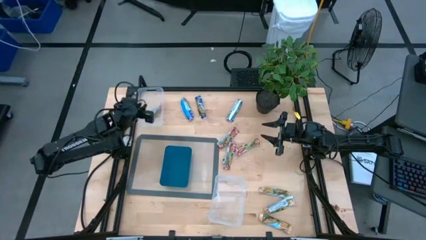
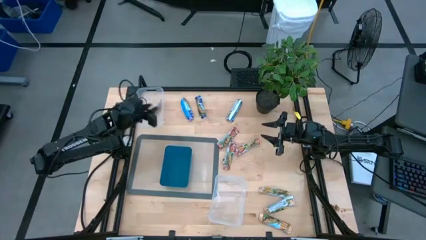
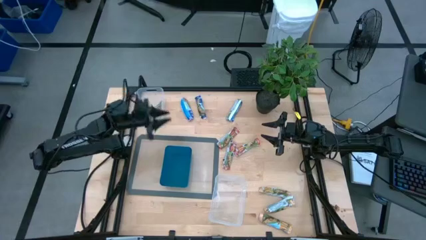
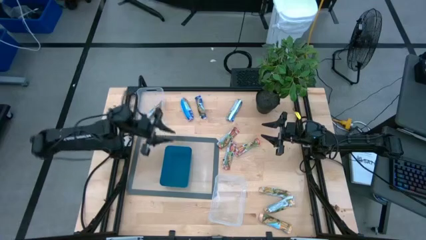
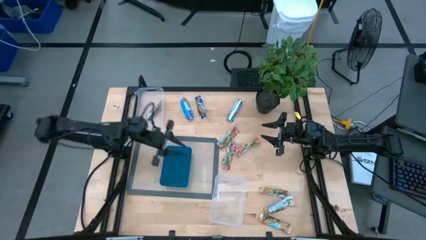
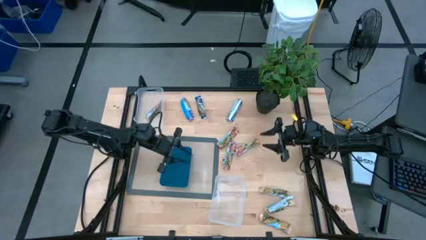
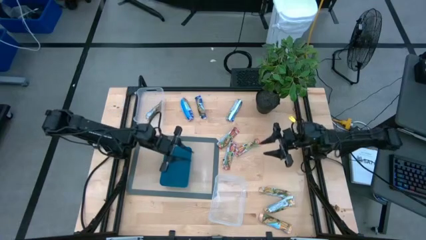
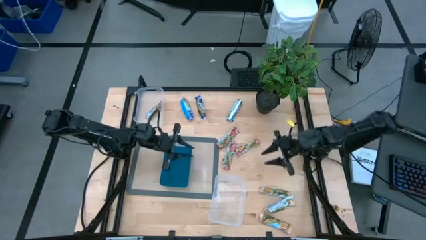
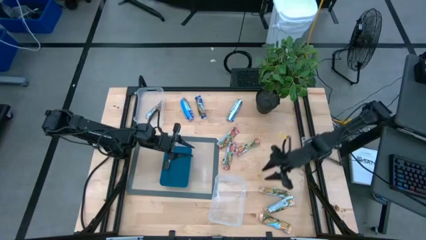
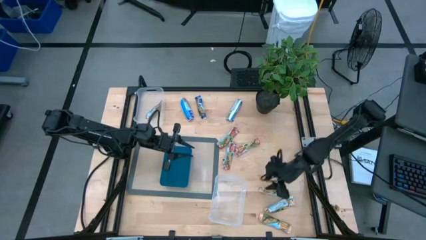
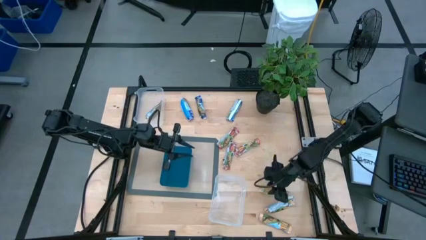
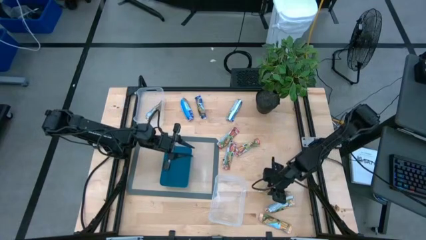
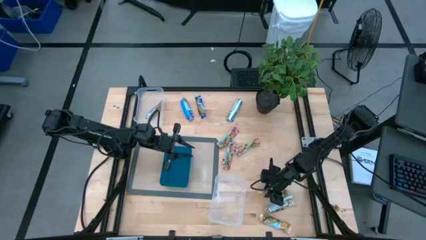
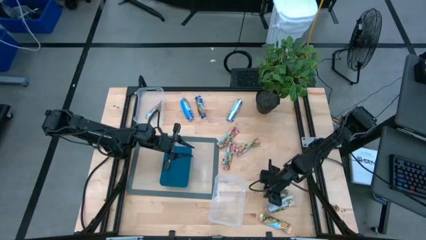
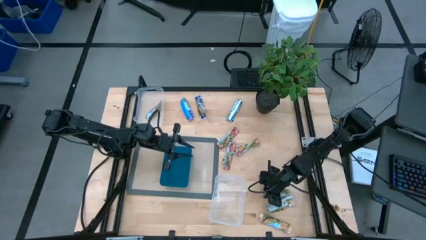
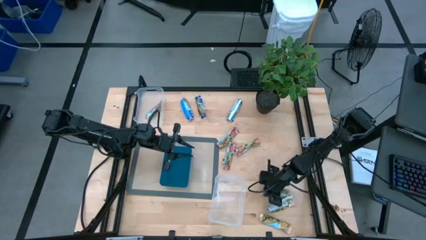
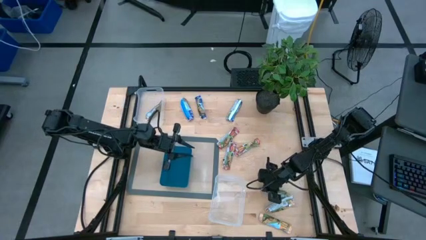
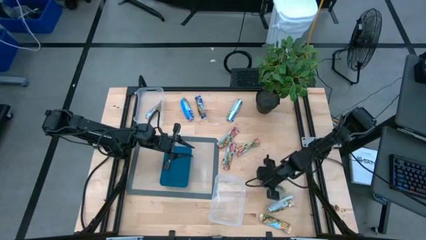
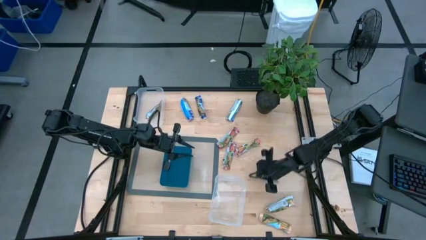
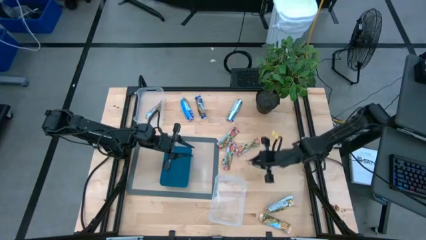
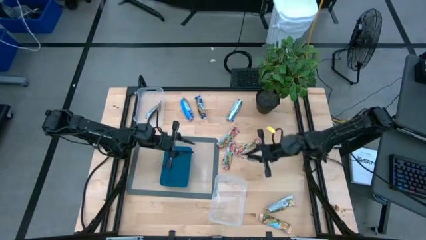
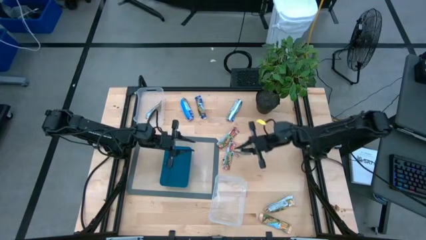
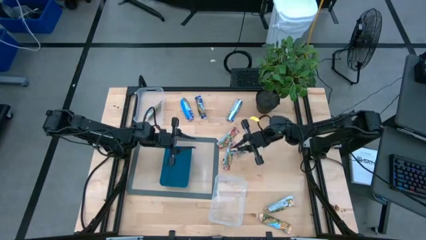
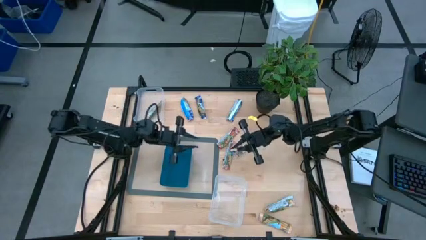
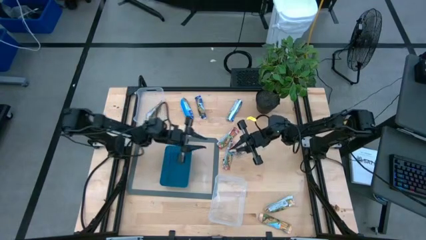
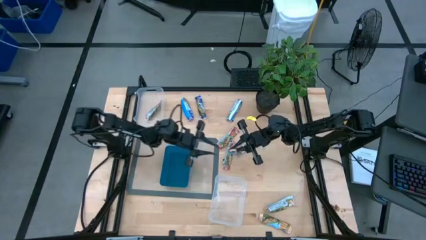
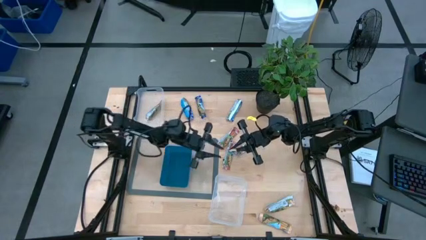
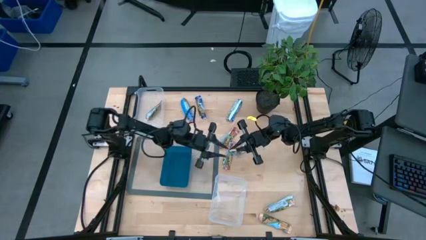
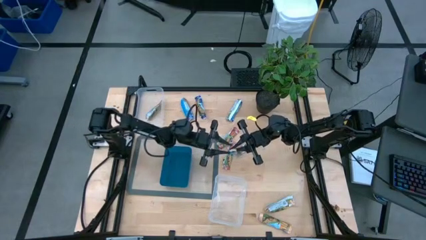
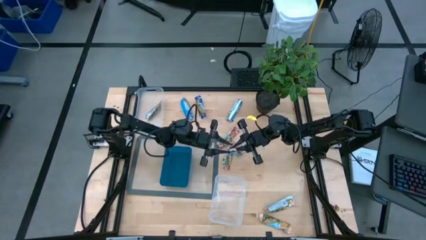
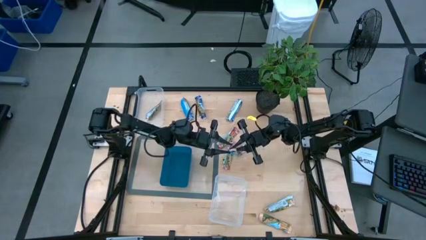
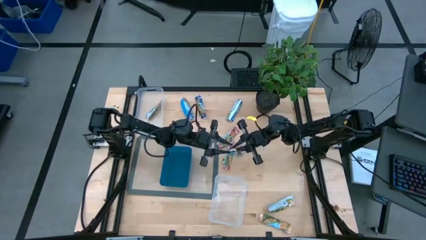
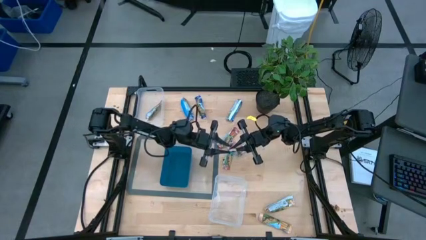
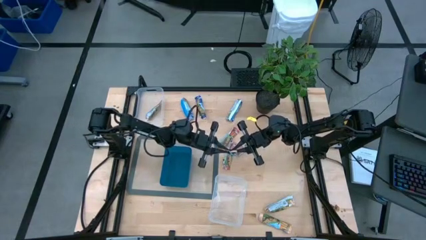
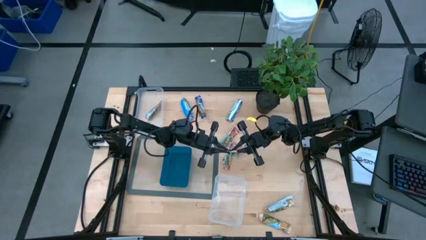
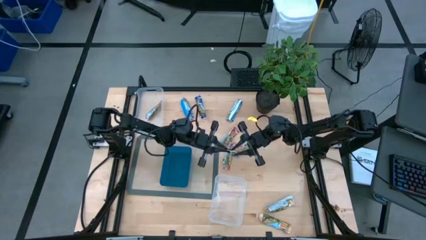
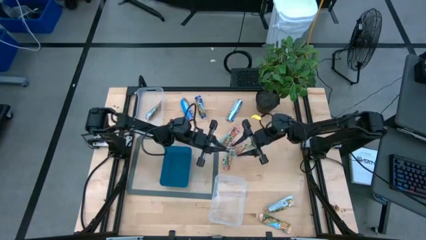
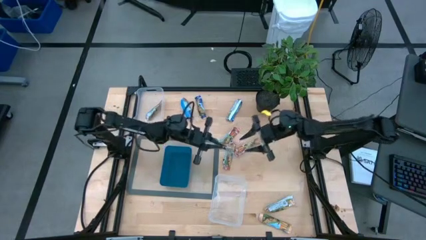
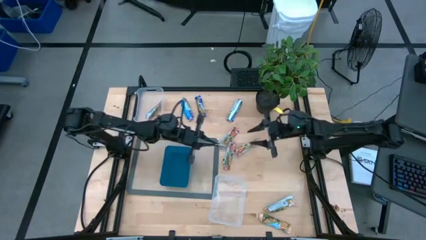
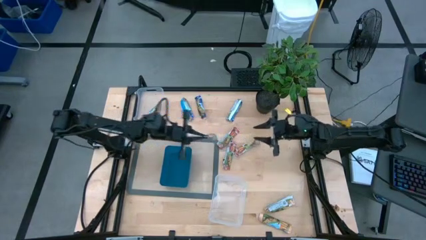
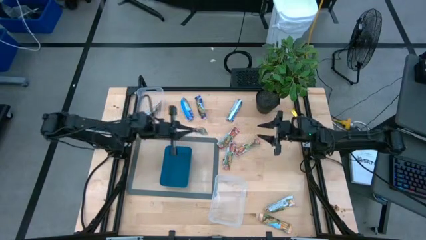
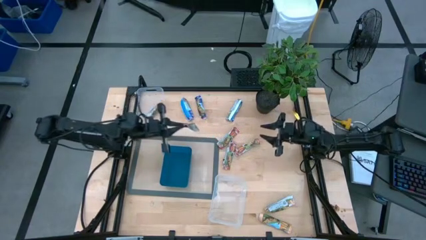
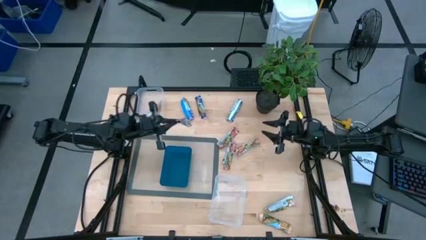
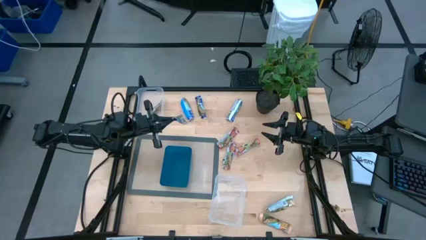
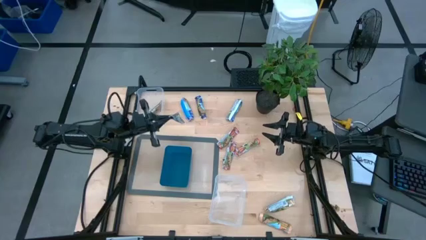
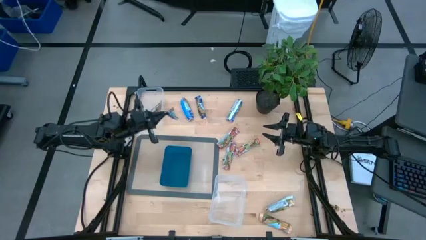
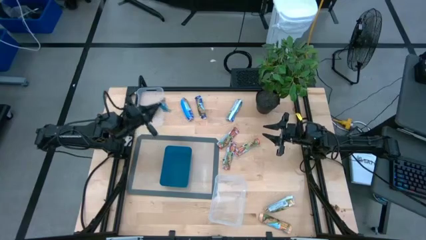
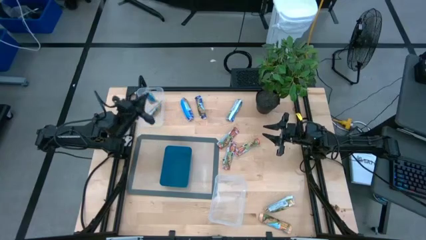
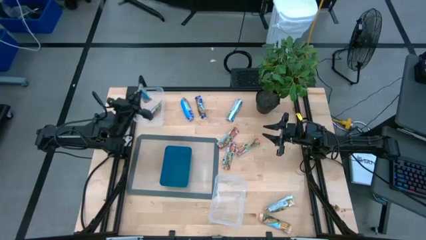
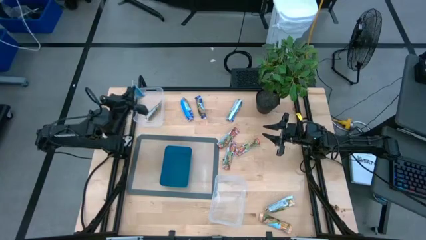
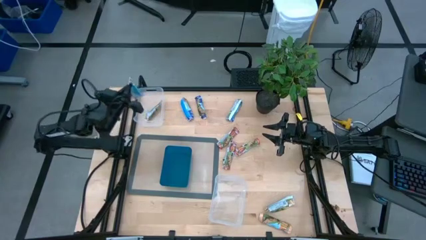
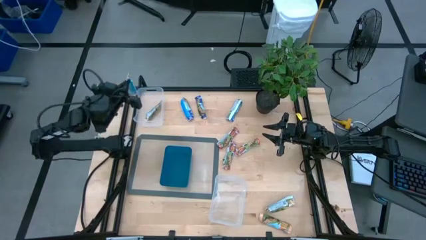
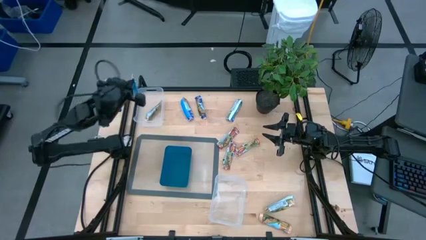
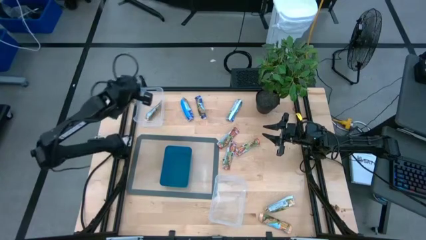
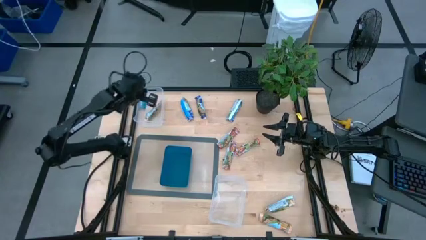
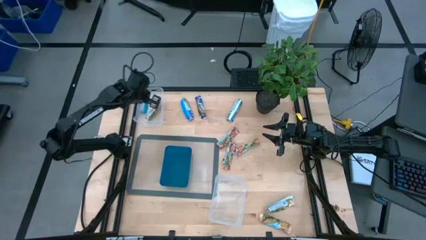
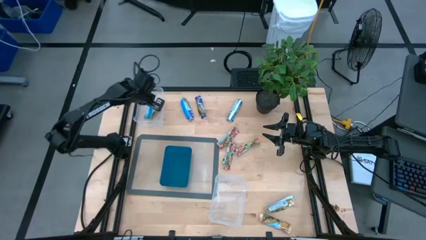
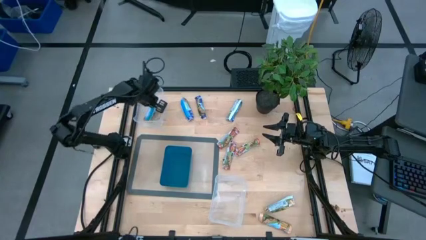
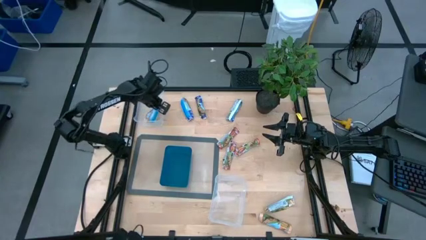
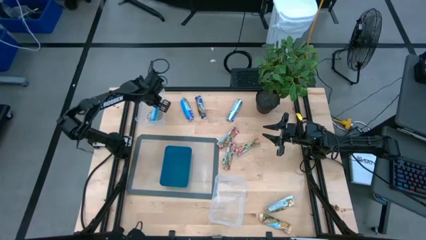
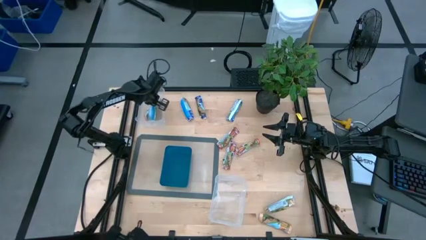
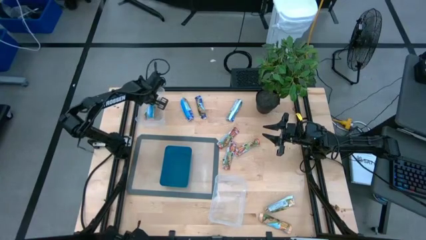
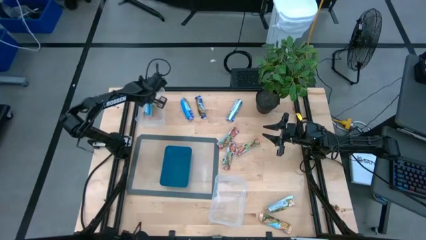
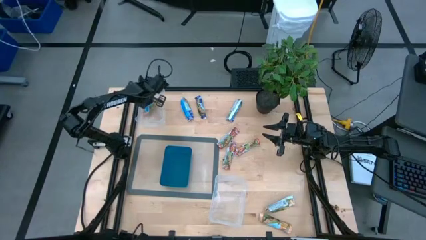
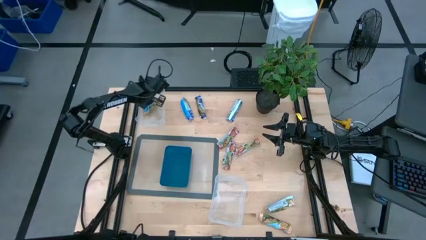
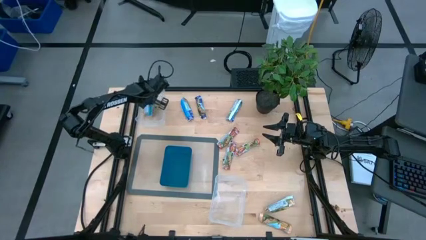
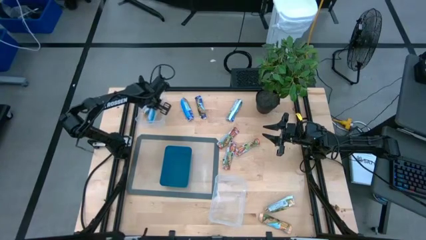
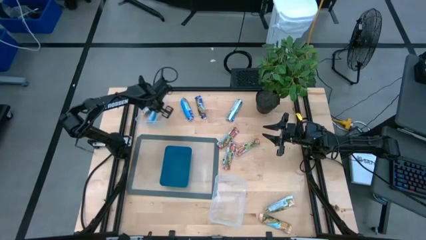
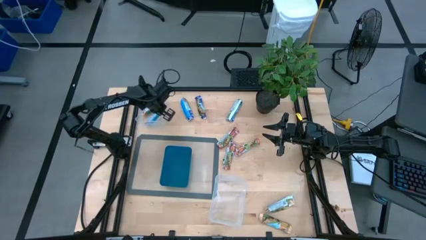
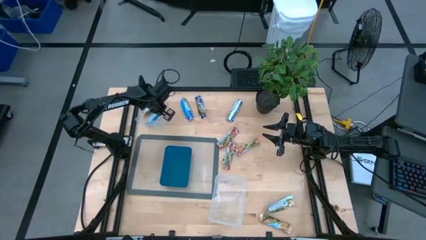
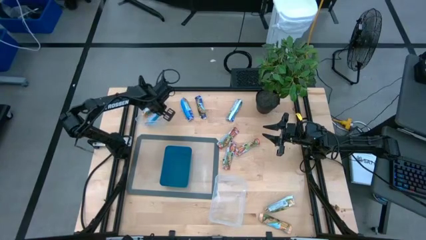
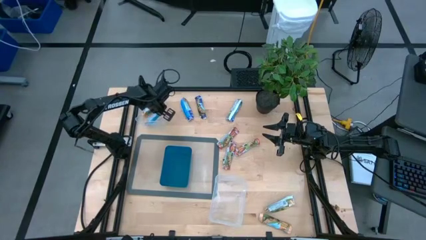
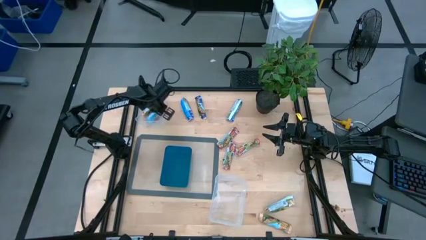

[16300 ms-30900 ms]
Task: Pick and place Granola Bars by type
Put the yellow granola bar into the top transparent bin
